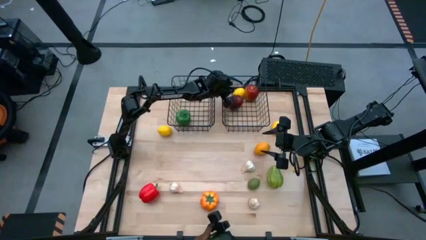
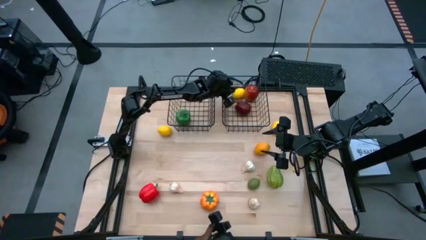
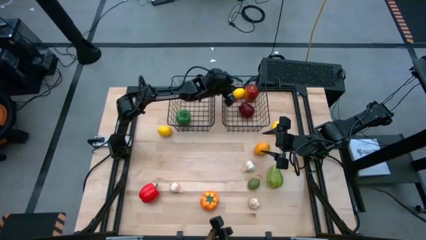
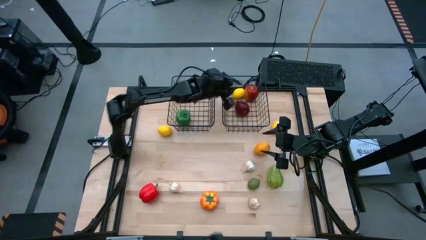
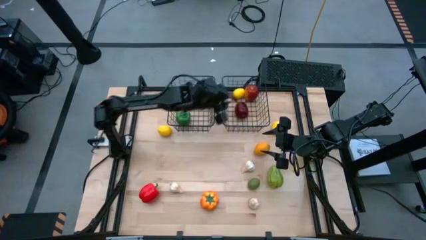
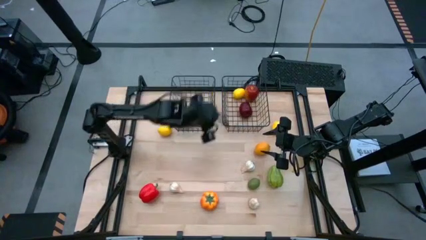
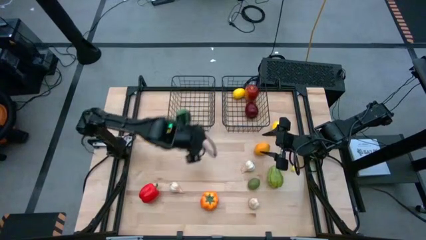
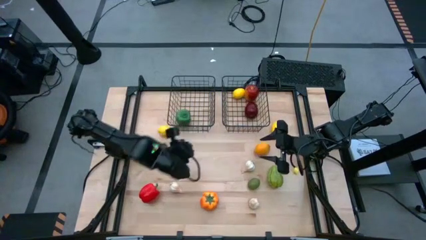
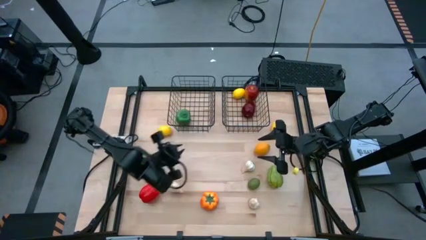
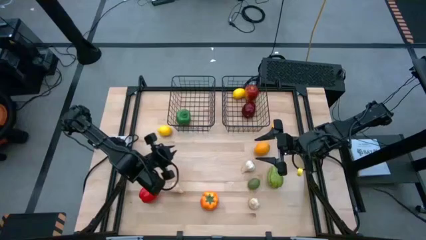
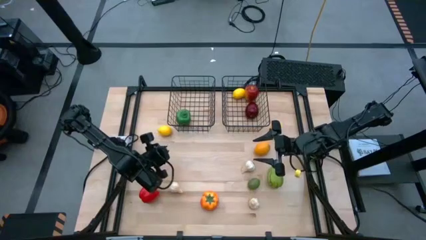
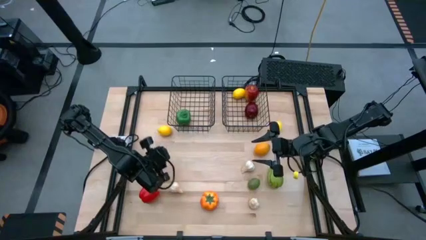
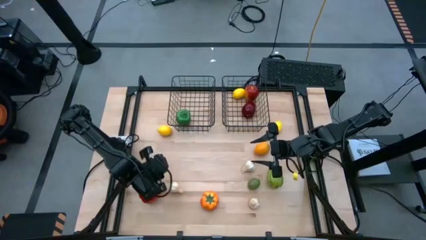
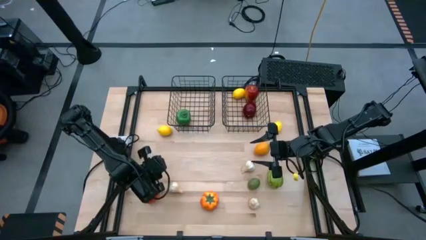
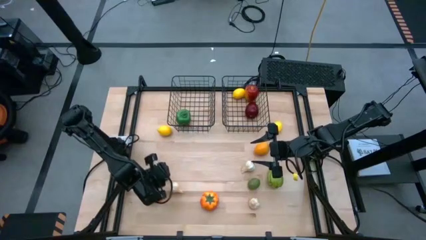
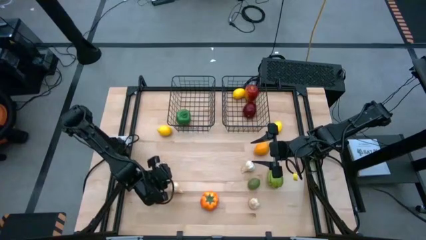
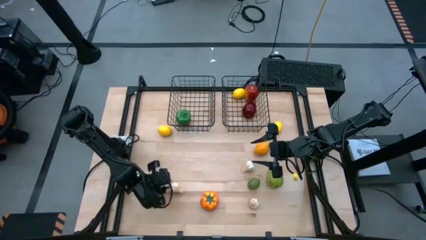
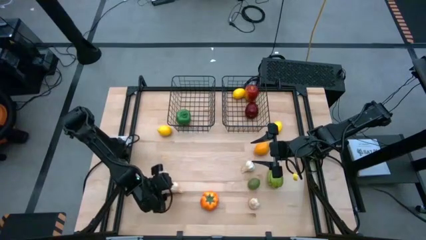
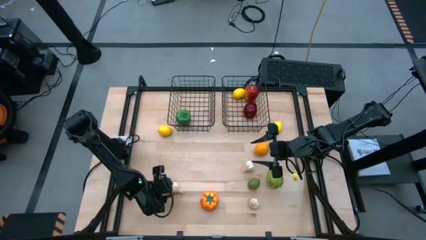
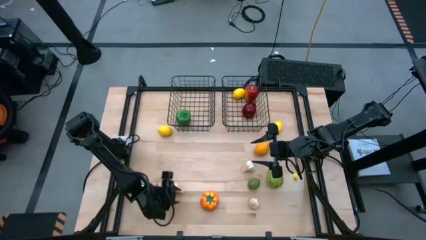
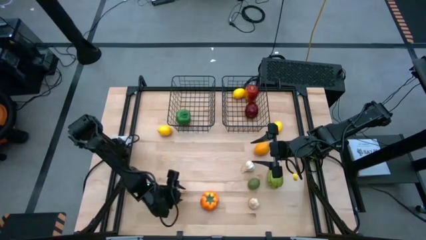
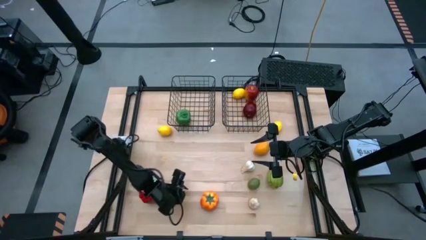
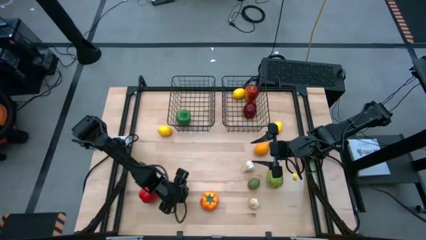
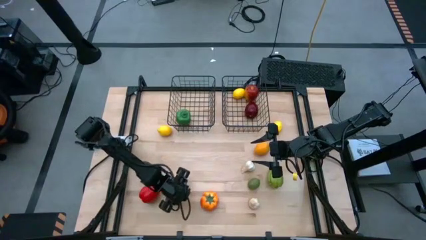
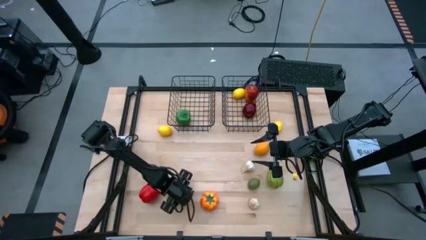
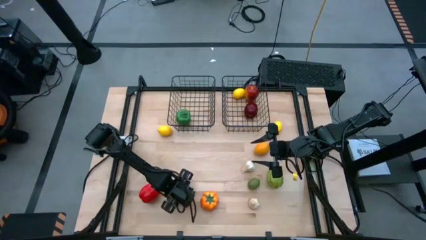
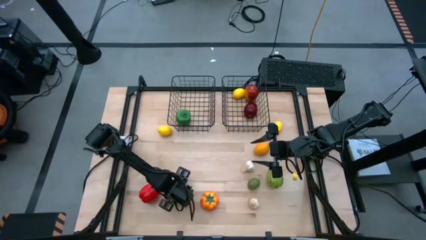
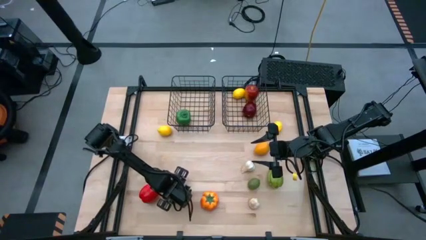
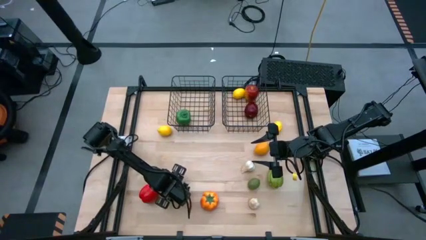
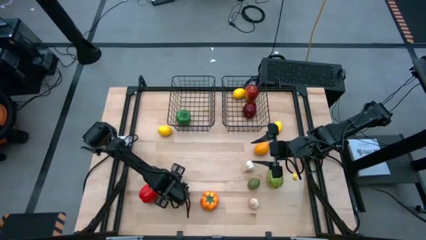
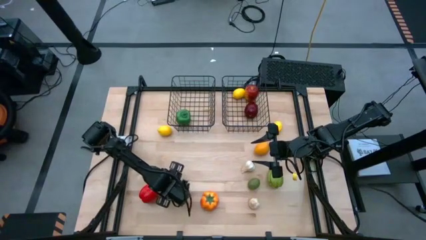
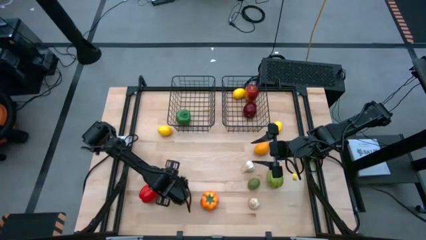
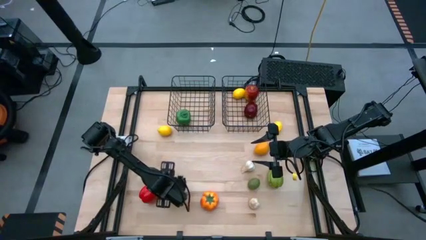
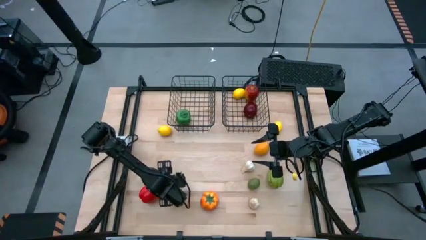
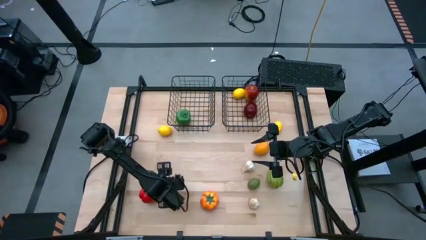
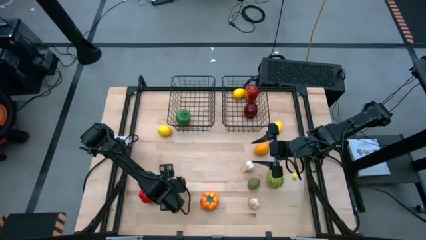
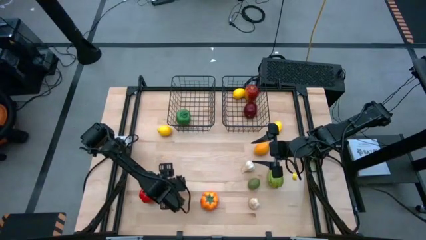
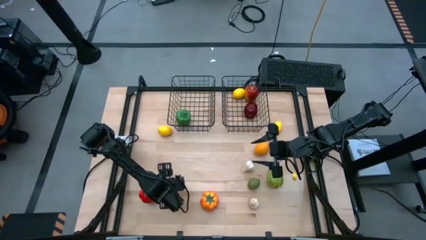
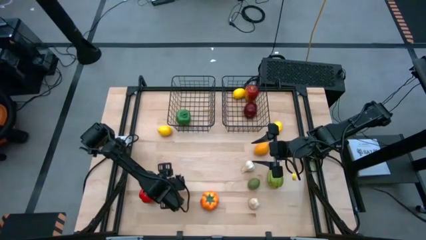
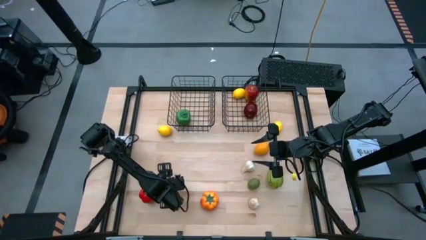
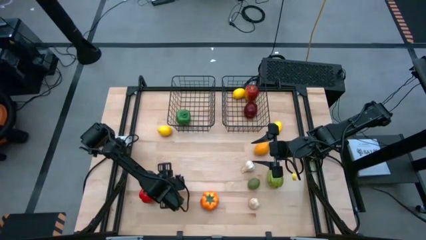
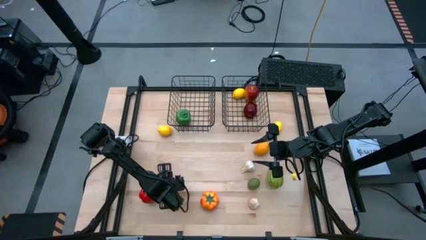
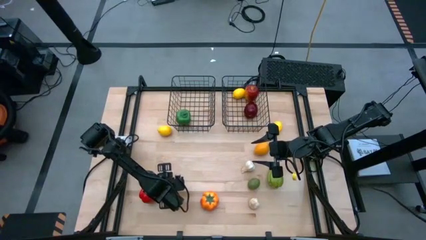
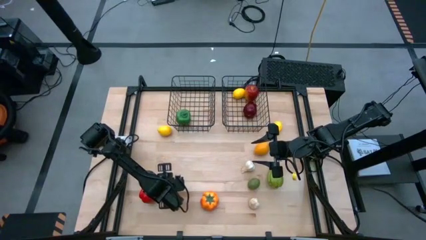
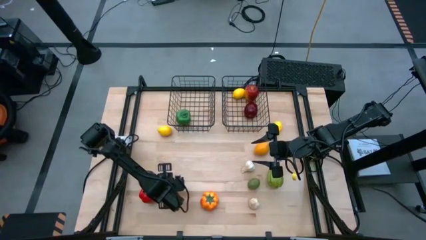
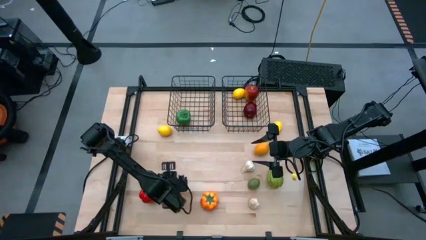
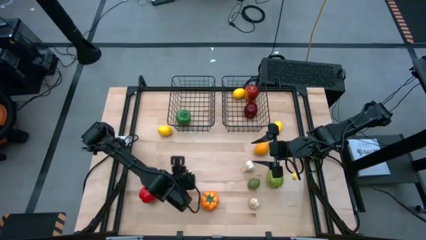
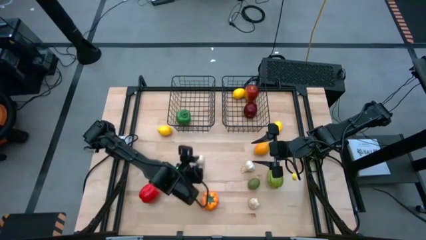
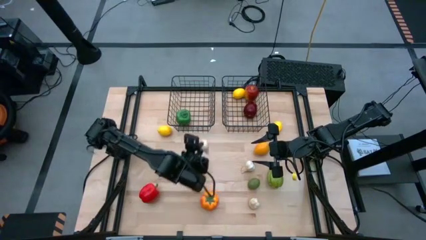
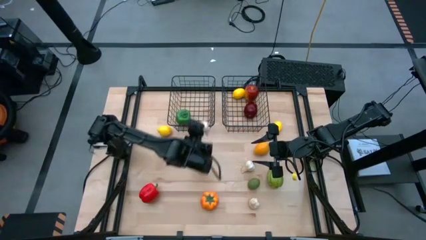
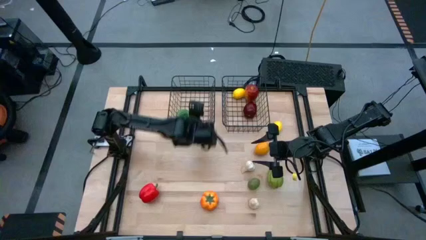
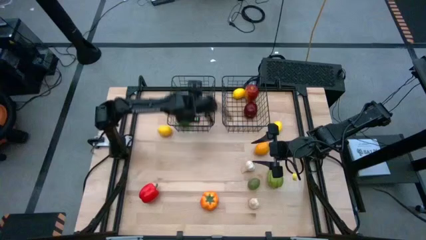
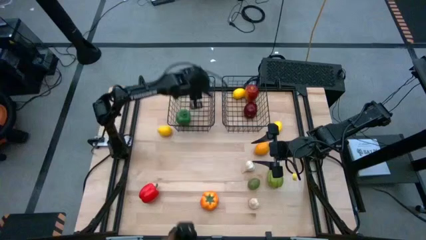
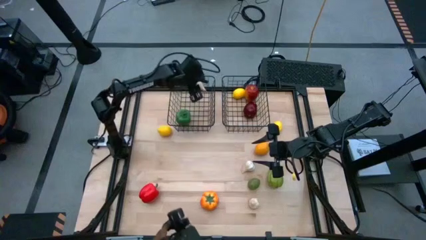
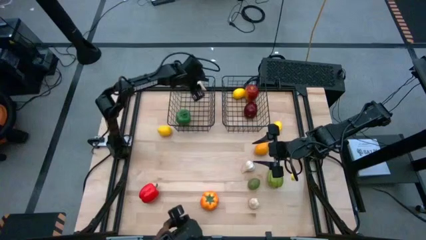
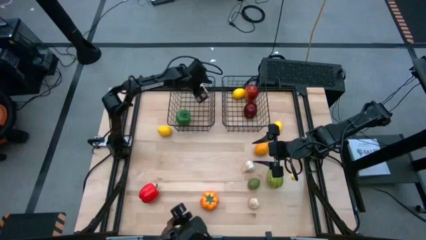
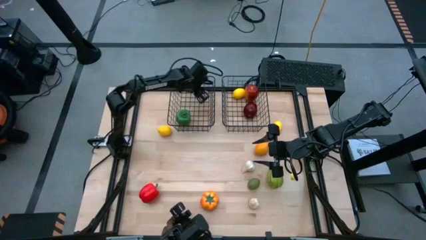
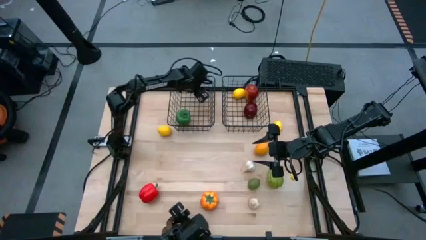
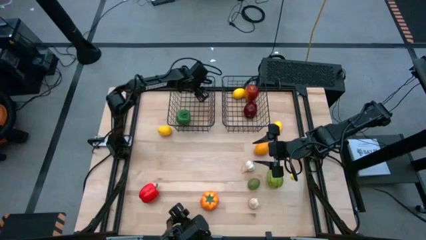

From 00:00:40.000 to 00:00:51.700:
Task: Sort produce into baskets
Put the white garlic into the left wire basket

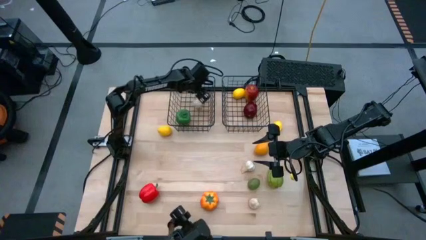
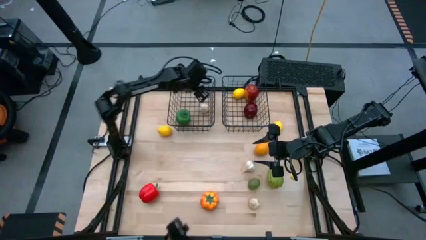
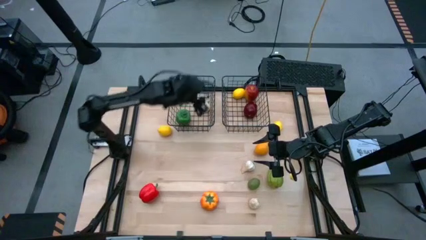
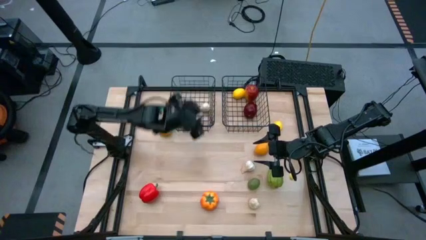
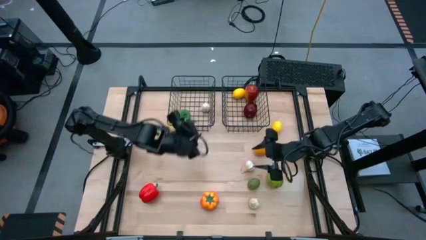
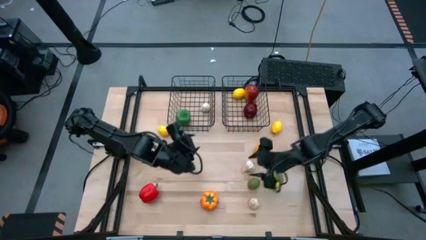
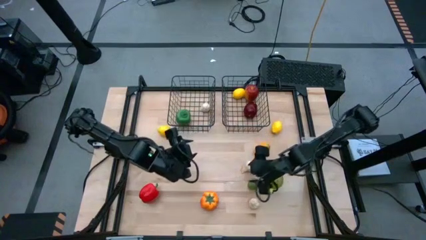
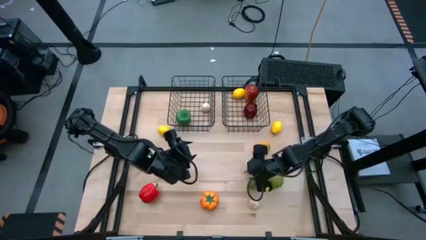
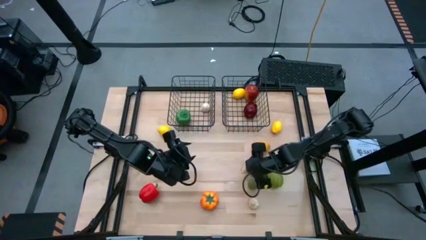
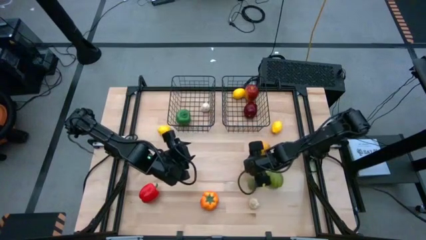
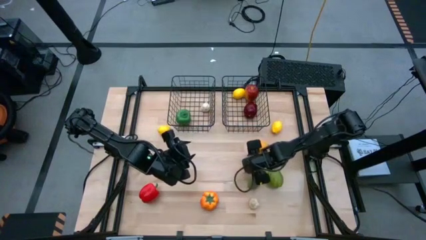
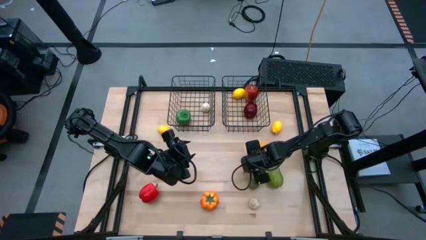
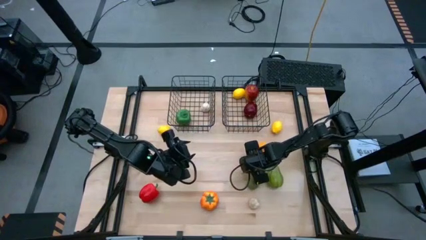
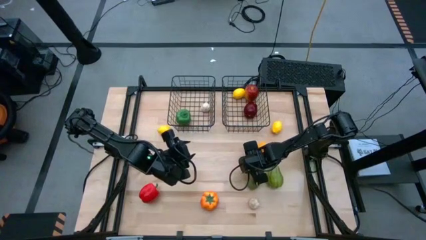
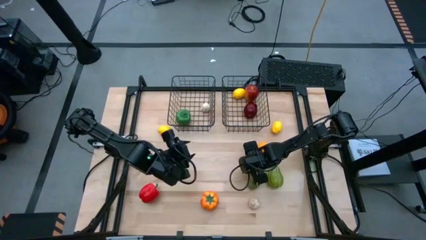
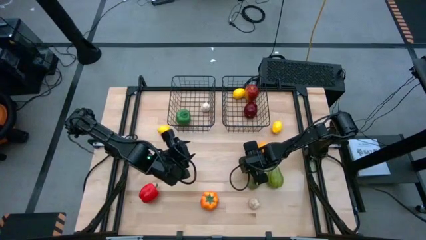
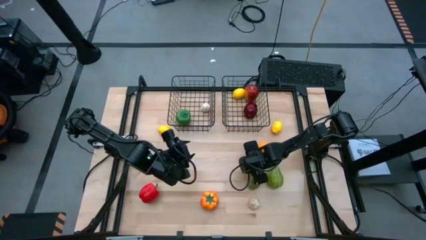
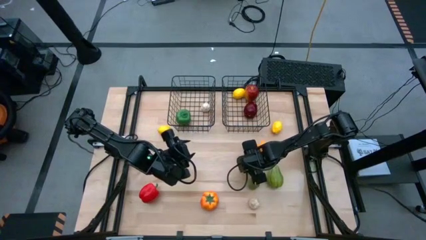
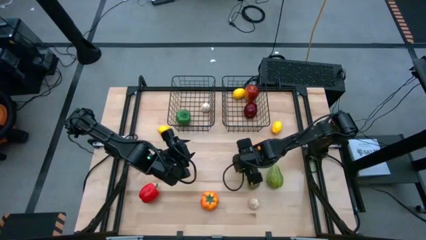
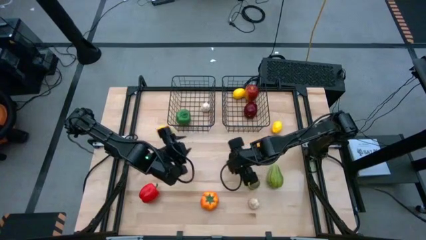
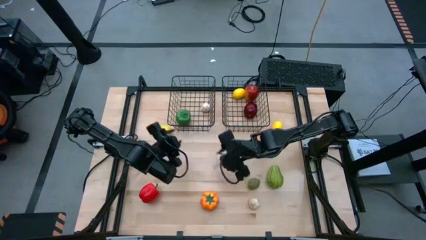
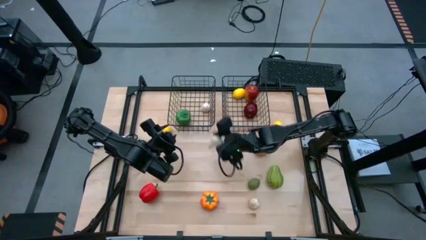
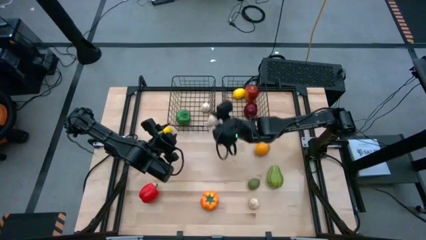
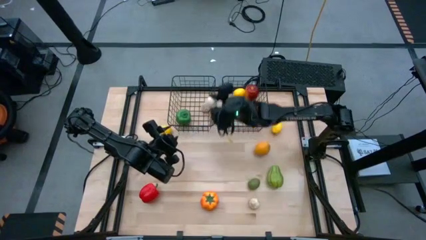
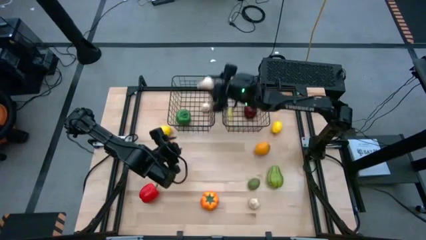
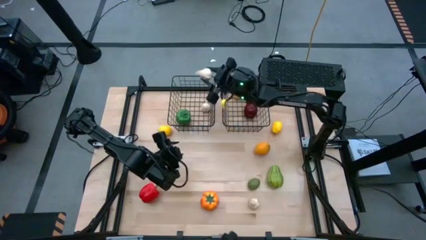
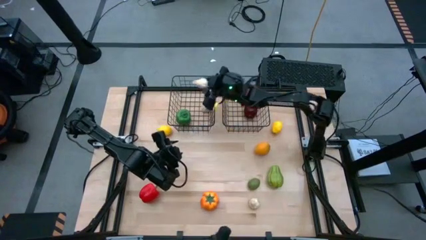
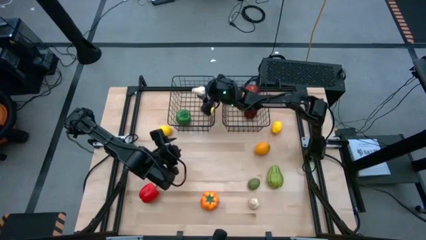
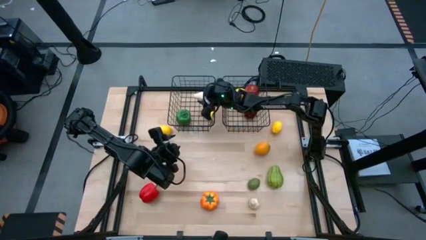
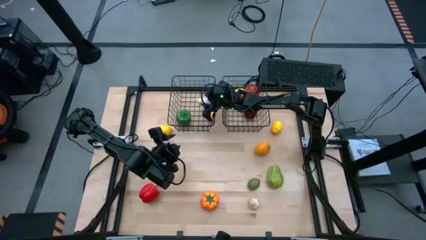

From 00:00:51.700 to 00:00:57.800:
Put the white garlic into the left wire basket
